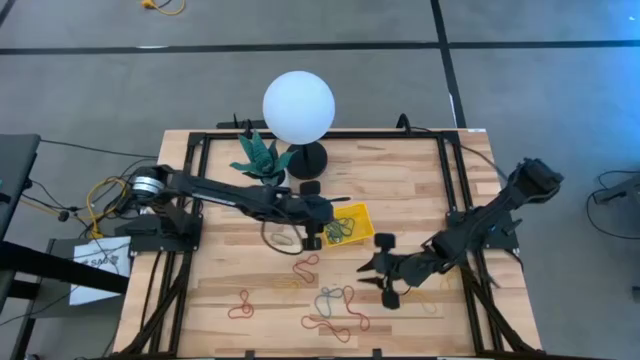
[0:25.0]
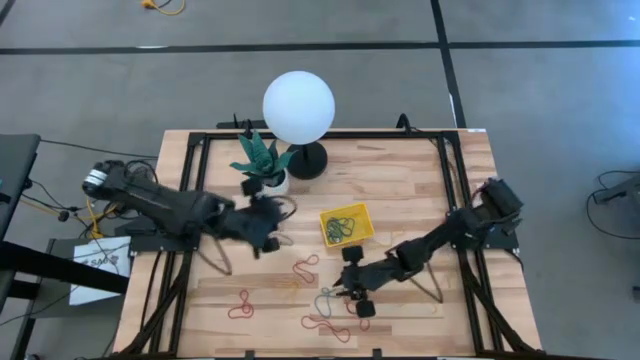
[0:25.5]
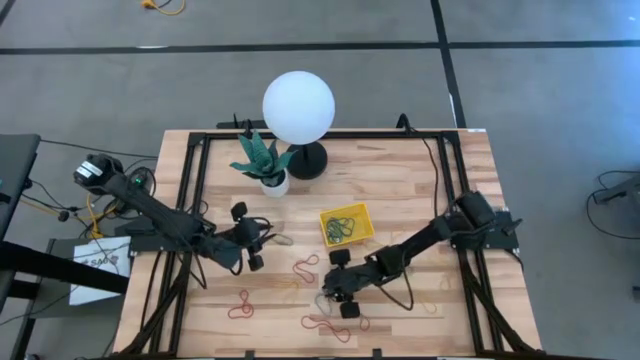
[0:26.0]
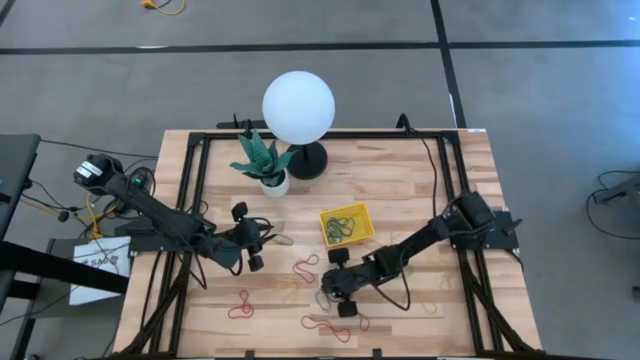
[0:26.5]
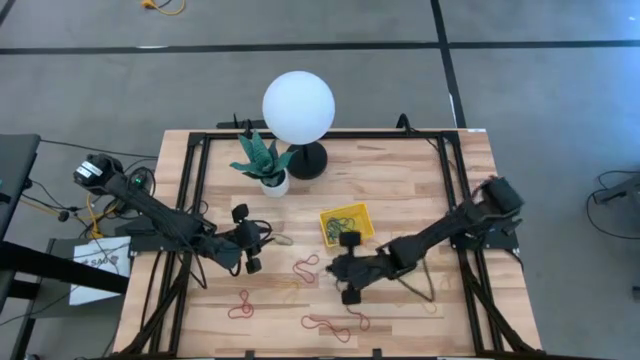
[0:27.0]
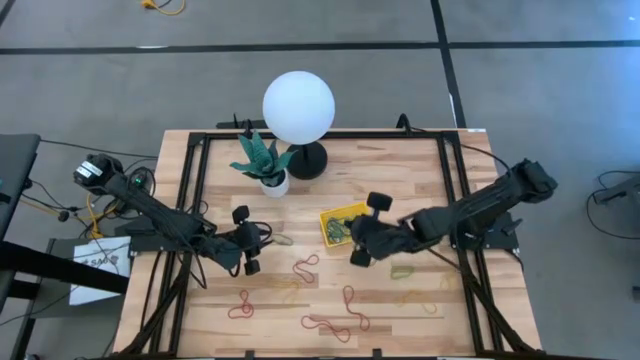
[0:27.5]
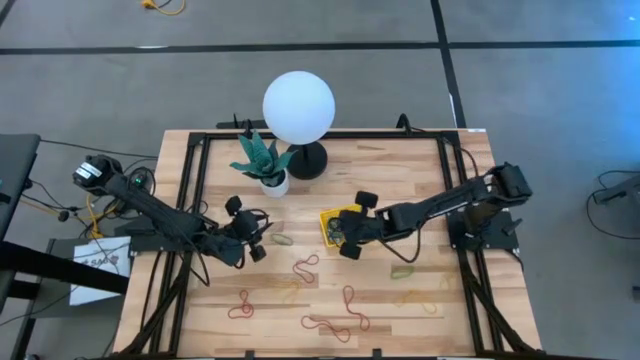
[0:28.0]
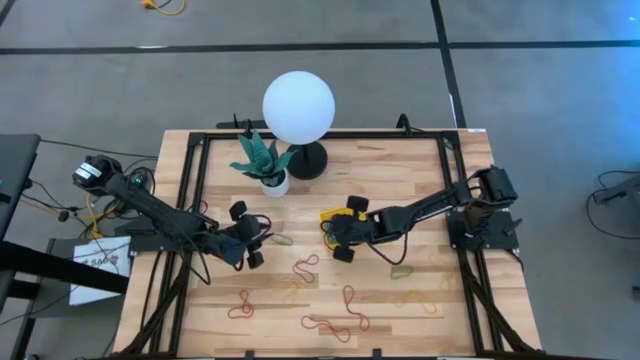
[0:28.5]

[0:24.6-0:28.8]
Task: Pick and place items into bin
Put the blue rubber band into the yellow bin

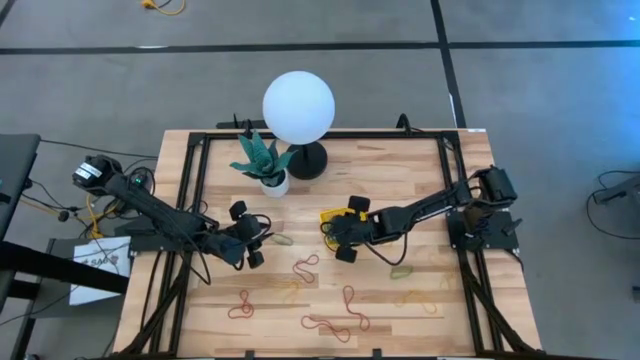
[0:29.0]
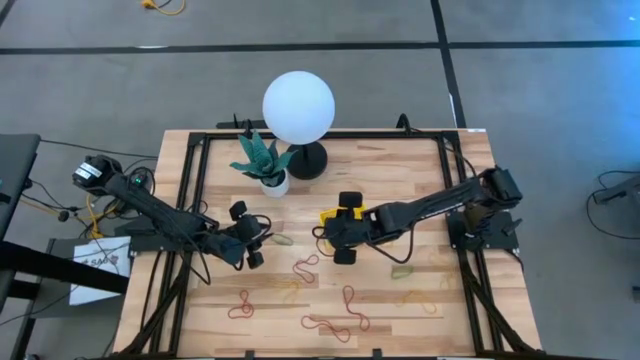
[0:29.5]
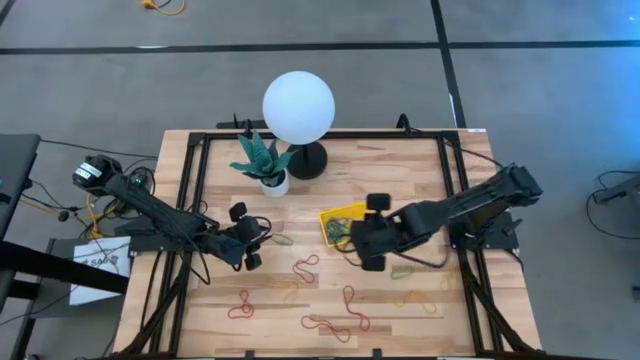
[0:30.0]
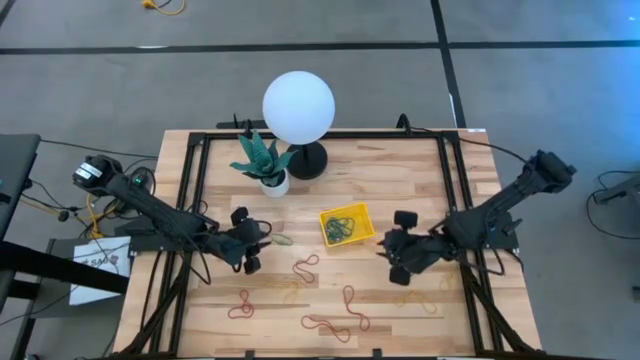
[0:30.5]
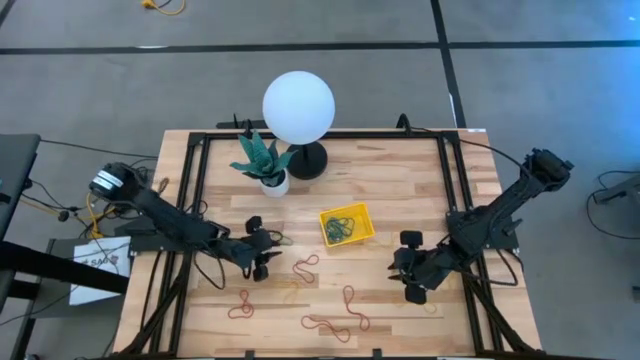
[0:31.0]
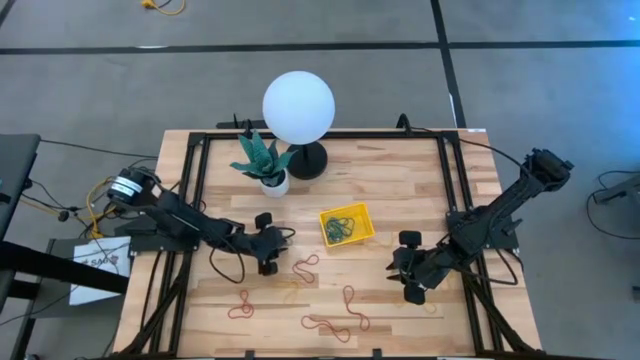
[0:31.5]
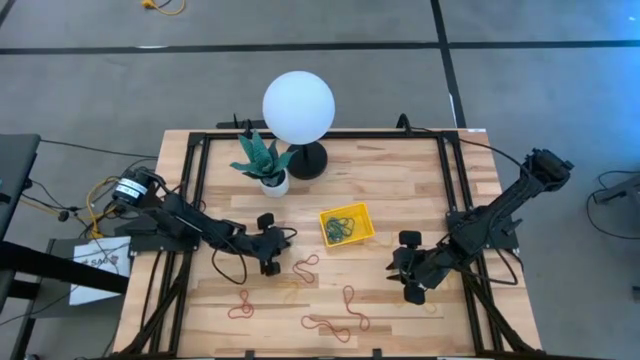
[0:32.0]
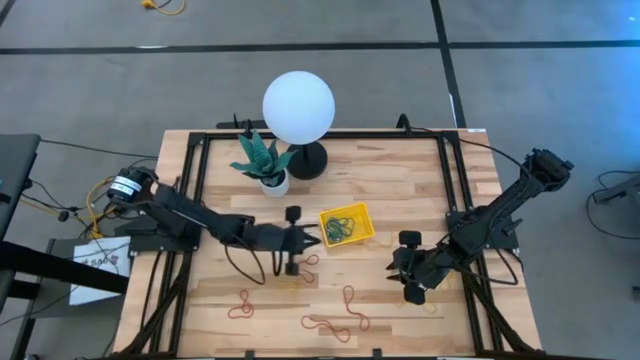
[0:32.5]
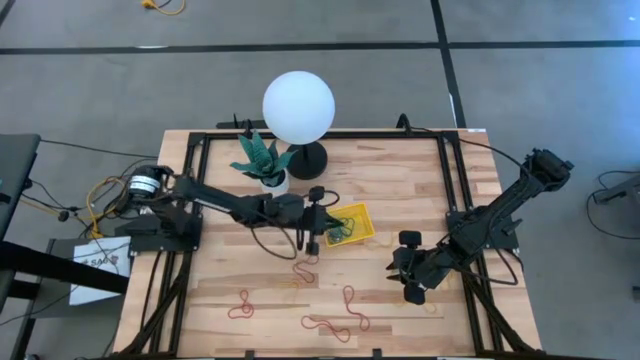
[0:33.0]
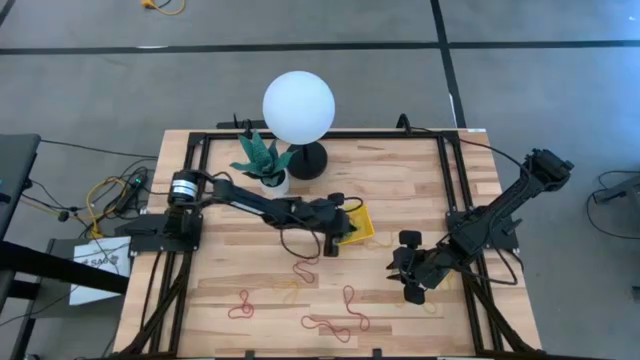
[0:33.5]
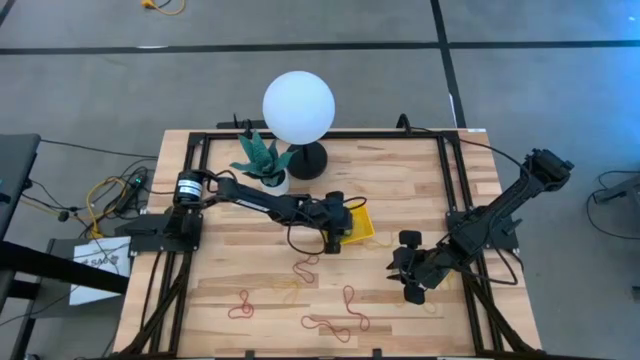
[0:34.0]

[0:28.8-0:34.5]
Put the green rubber band into the yellow bin

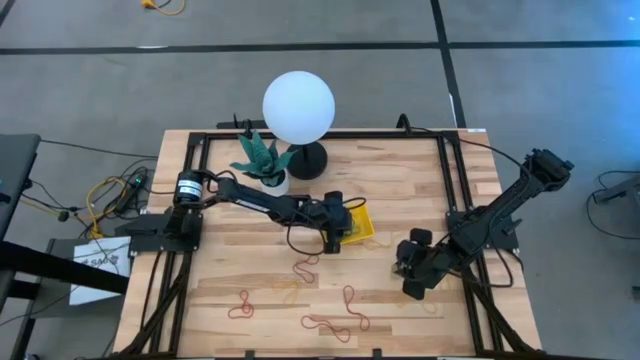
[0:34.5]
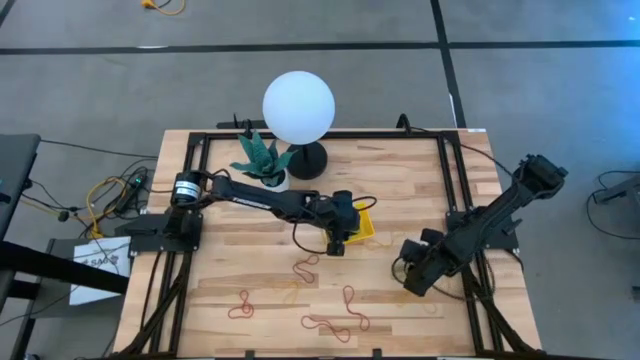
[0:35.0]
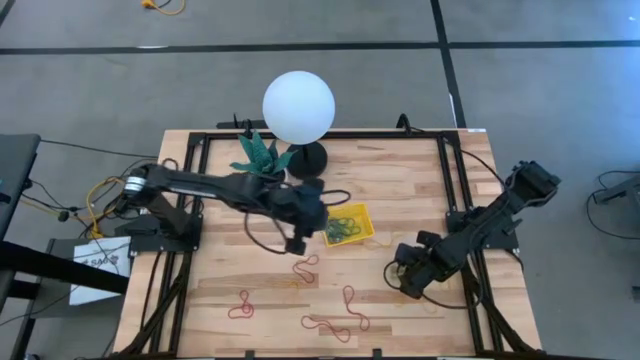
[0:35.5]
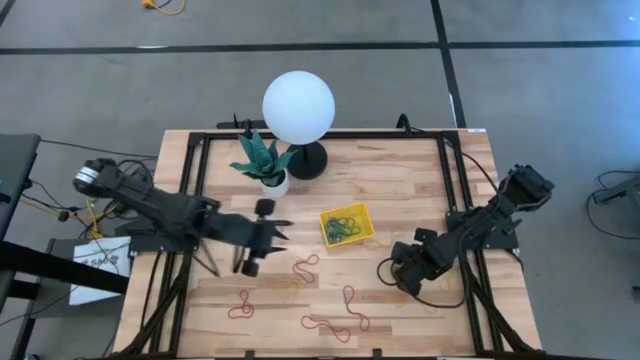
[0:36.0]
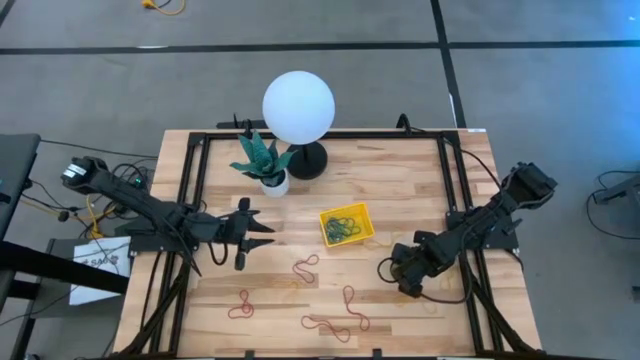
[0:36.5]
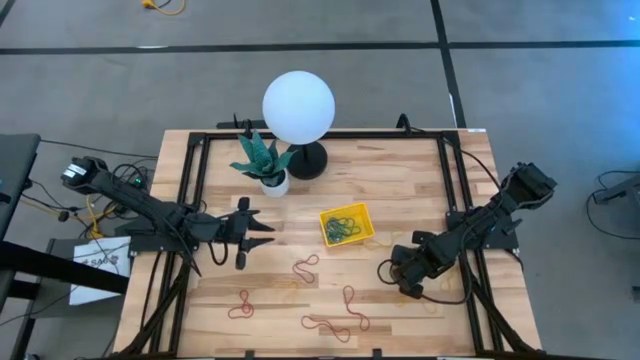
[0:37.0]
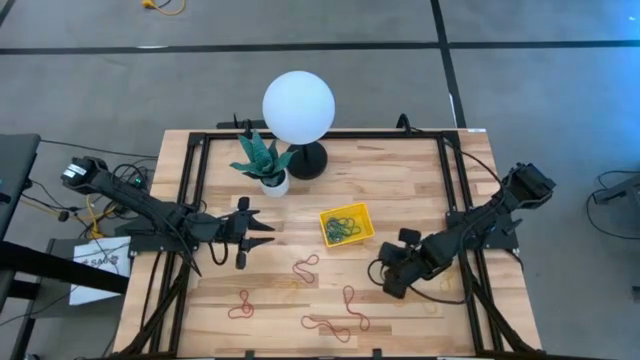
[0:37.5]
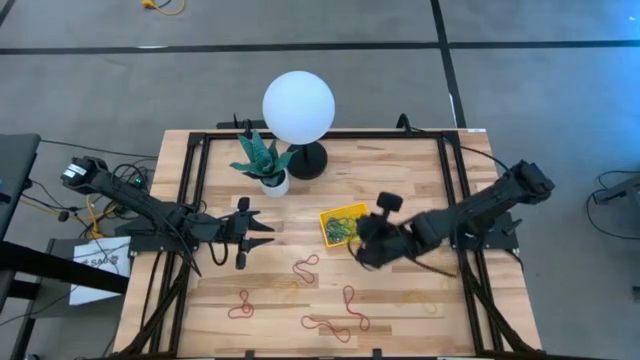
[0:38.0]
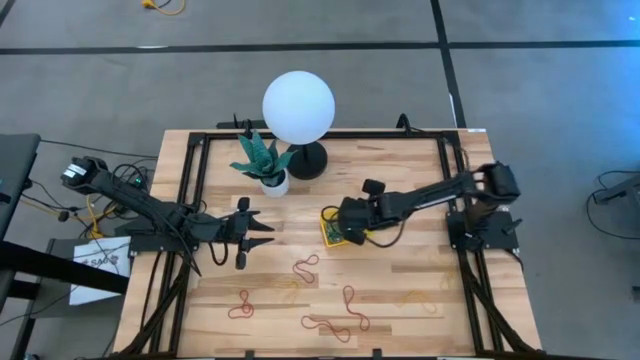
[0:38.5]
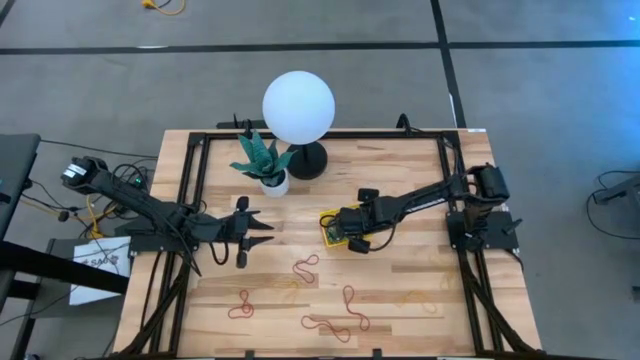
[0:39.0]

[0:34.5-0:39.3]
Put the green rubber band into the yellow bin

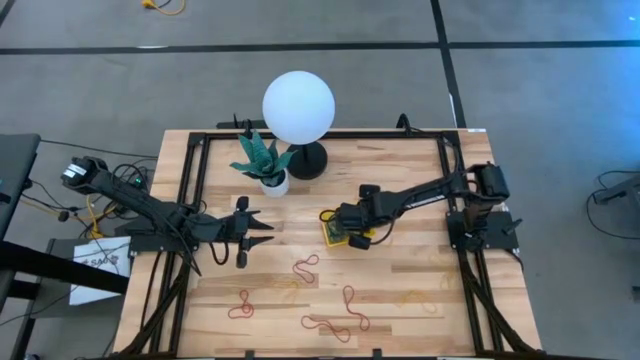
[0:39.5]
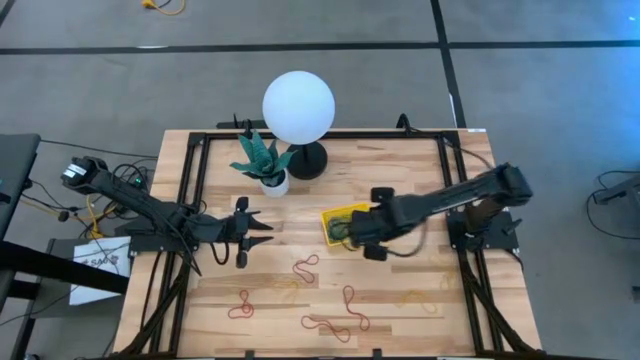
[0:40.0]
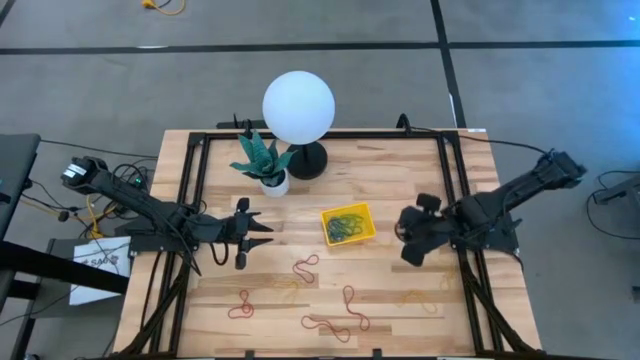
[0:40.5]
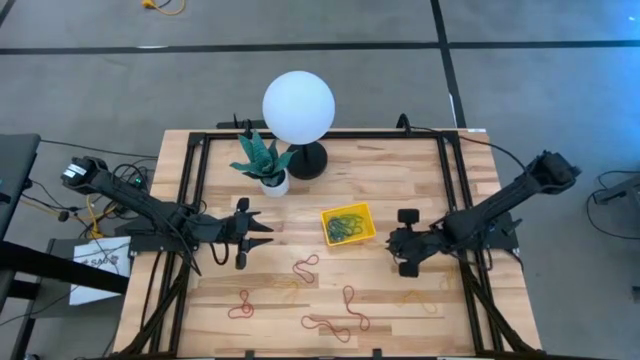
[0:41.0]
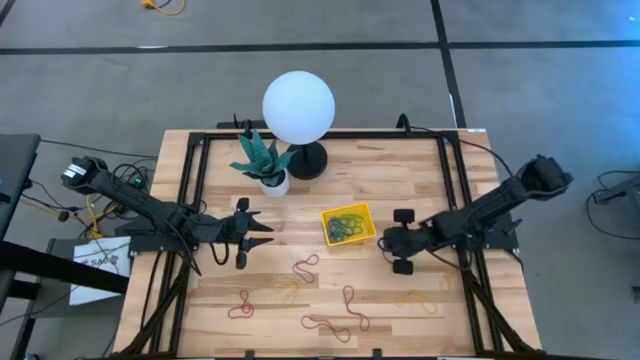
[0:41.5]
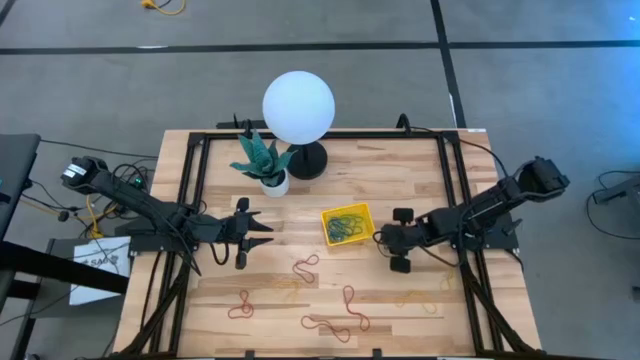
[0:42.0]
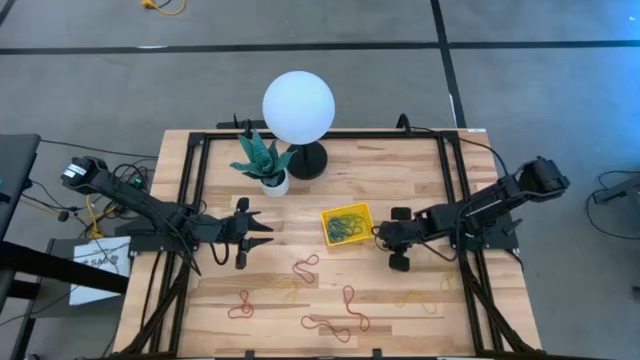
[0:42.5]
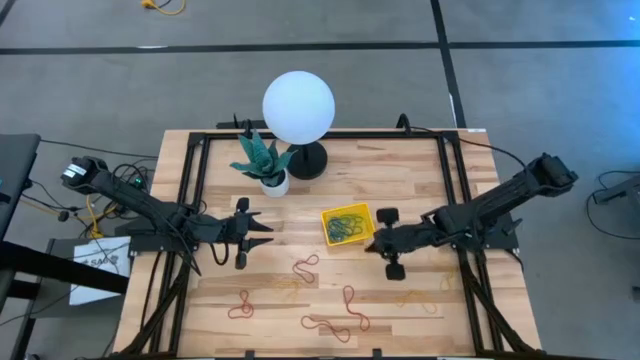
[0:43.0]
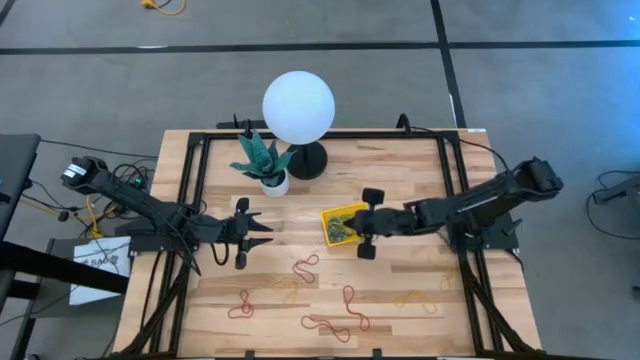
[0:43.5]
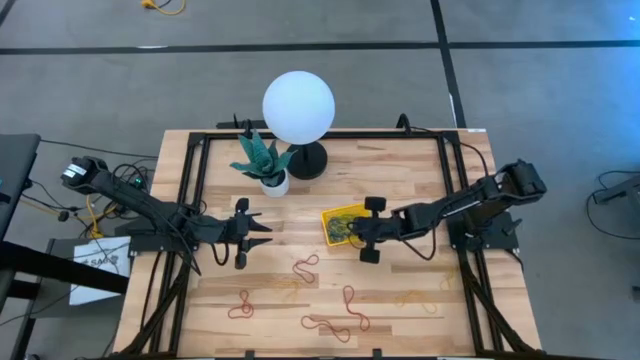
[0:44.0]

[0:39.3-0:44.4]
Put the yellow rubber band into the yellow bin

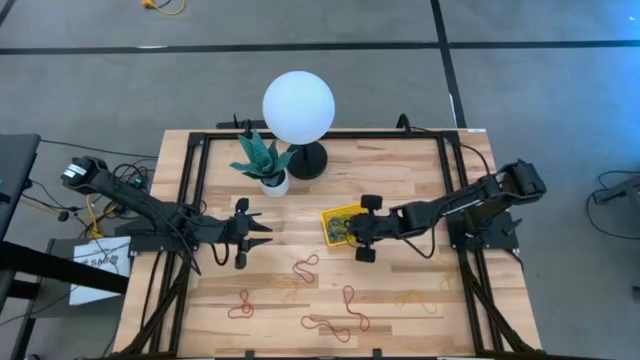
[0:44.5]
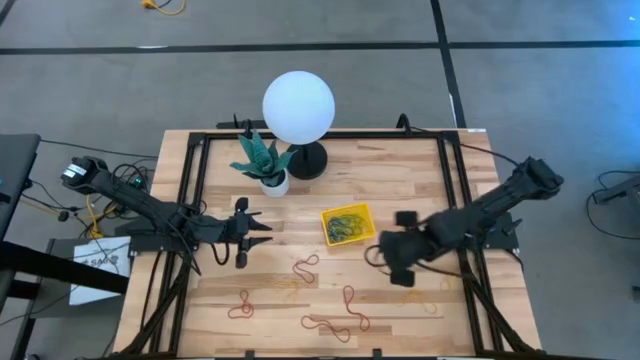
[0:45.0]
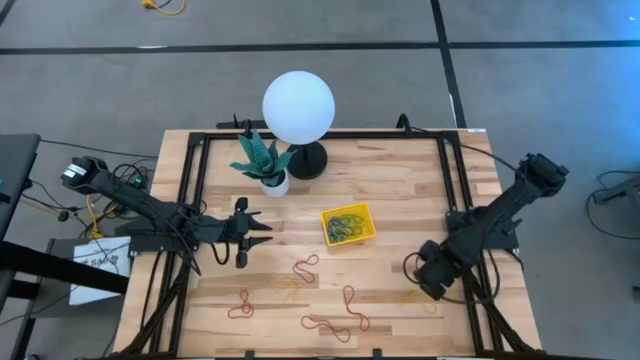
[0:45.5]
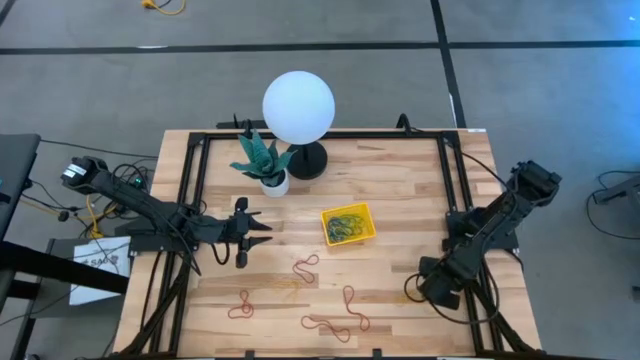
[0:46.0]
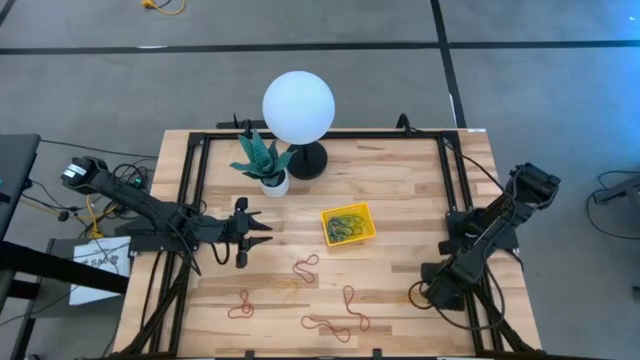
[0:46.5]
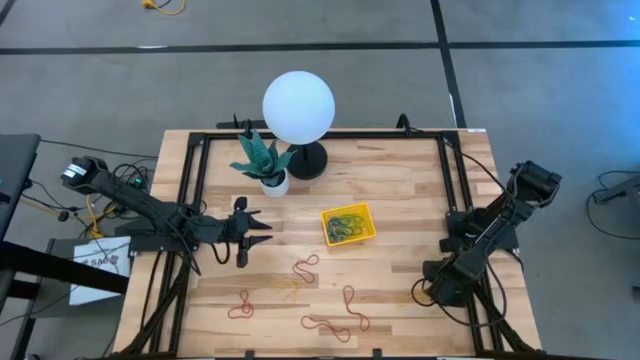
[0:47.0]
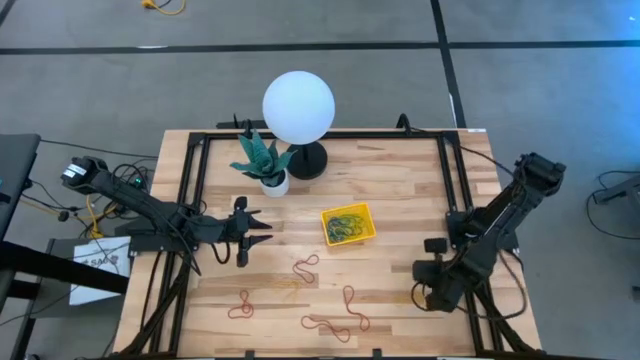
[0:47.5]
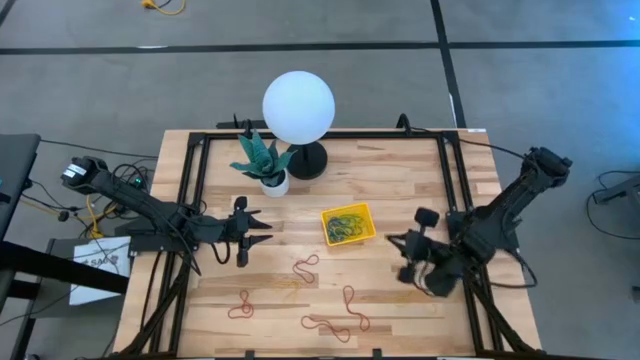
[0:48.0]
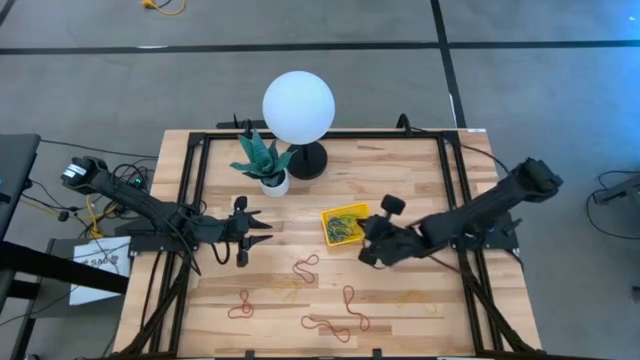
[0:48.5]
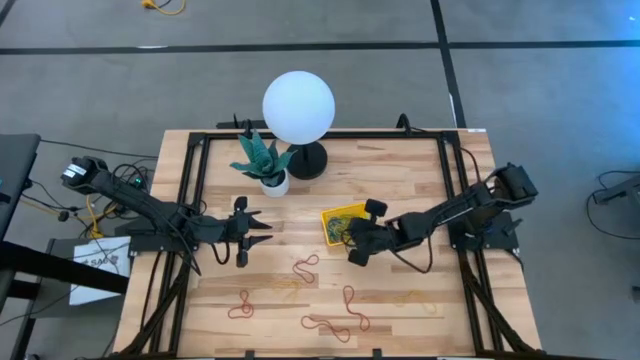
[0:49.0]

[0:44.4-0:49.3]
Put the yellow rubber band into the yellow bin
